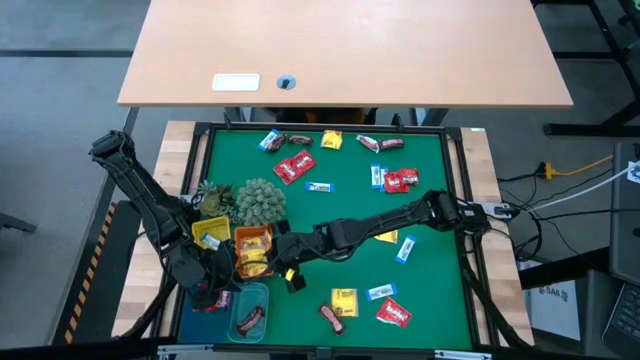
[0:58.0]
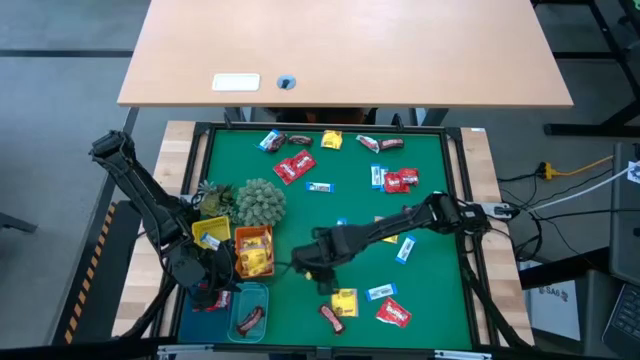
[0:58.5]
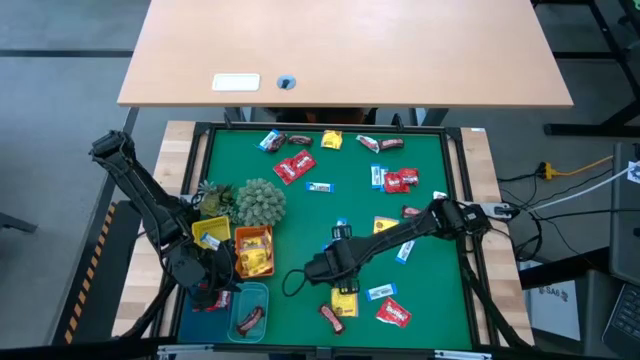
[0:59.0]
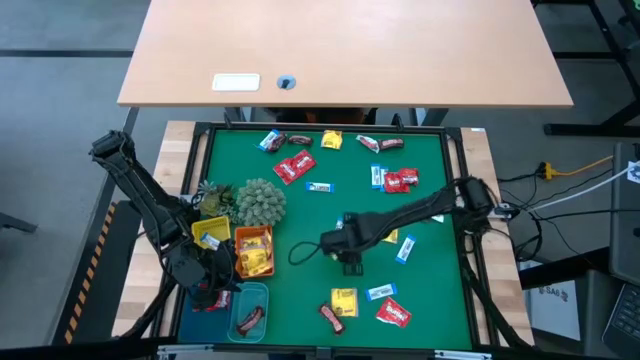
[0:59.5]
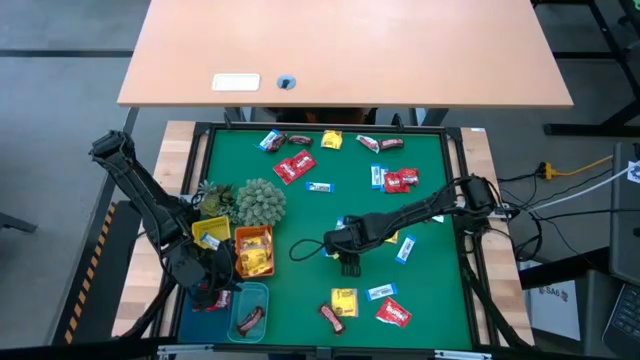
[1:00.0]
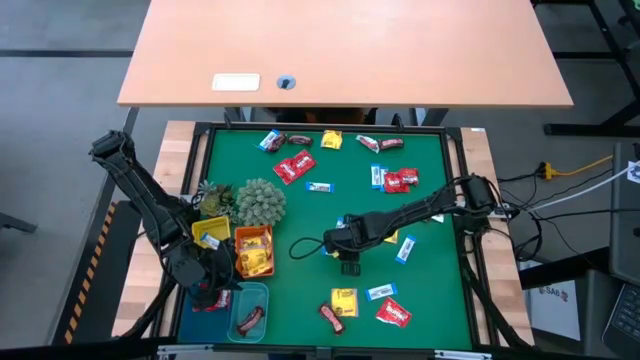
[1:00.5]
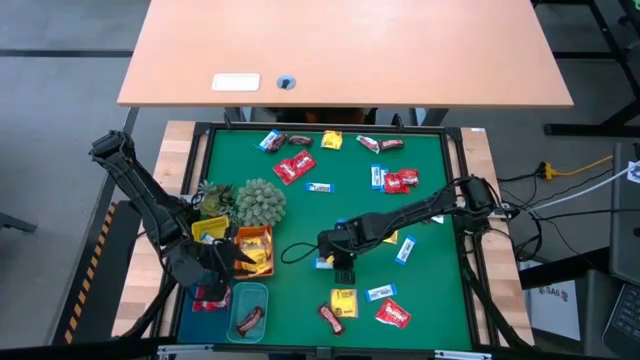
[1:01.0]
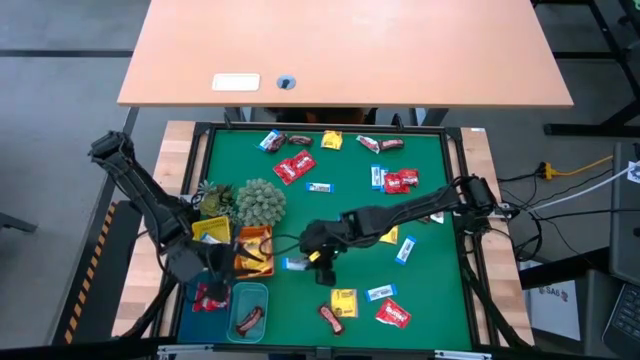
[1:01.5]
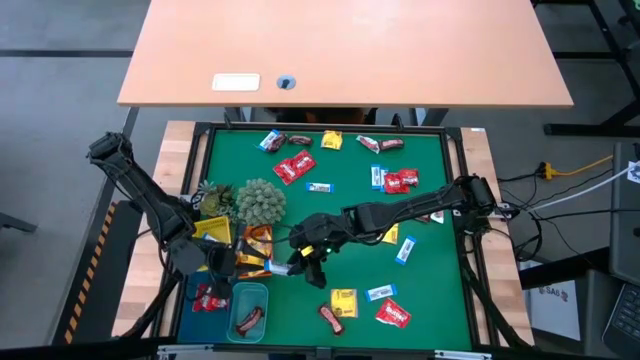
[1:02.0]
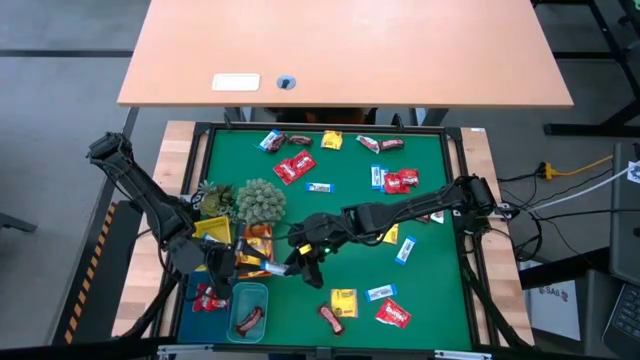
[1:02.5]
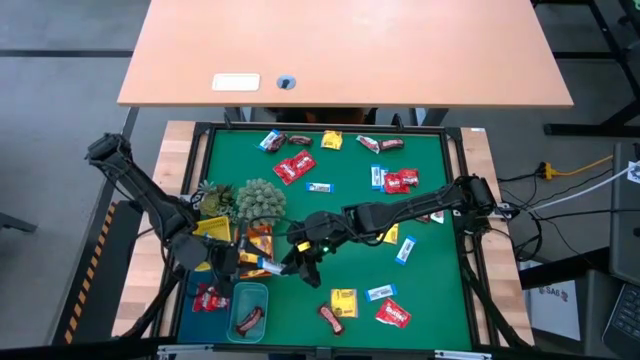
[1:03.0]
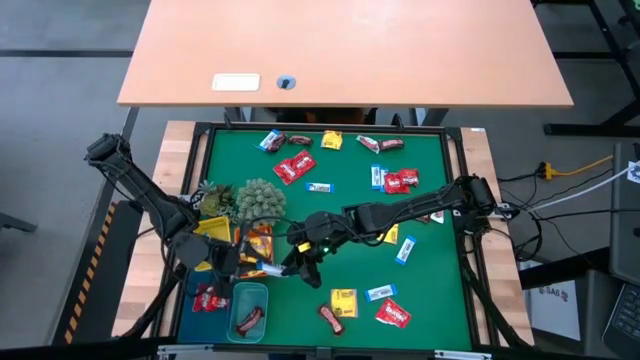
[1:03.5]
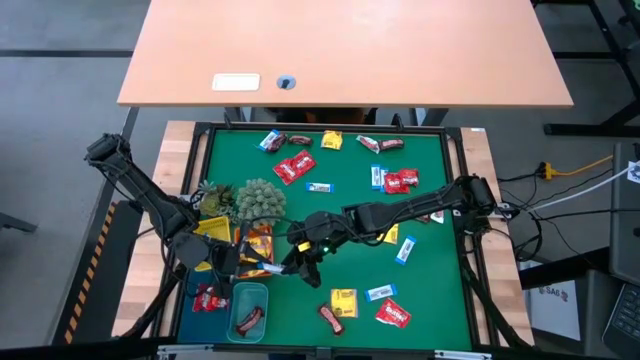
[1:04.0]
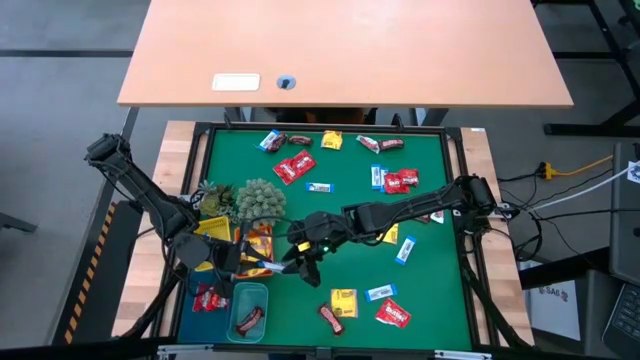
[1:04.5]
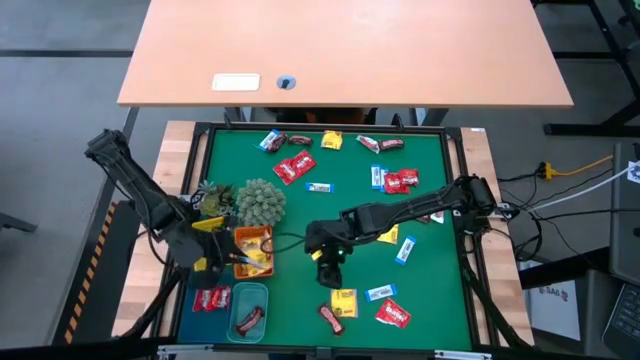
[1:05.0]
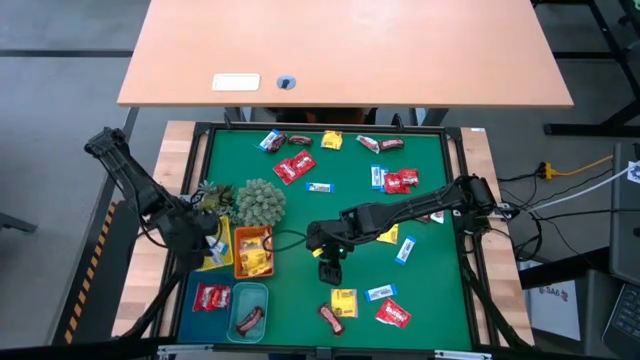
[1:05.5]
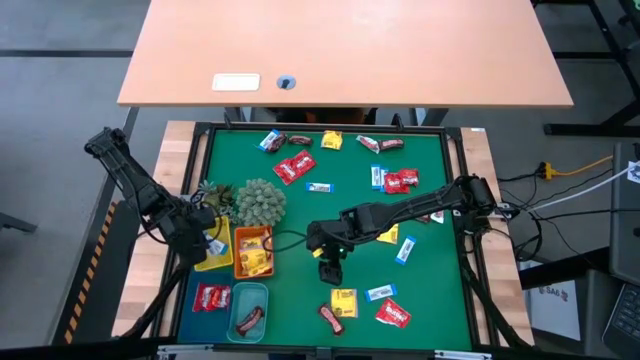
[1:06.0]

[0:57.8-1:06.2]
Task: Sort candy
Put the white chocolate into the yellow basket

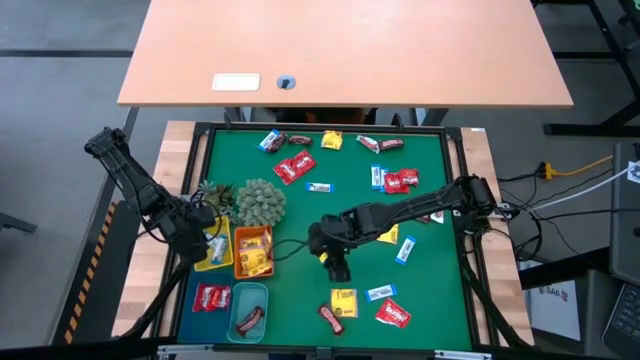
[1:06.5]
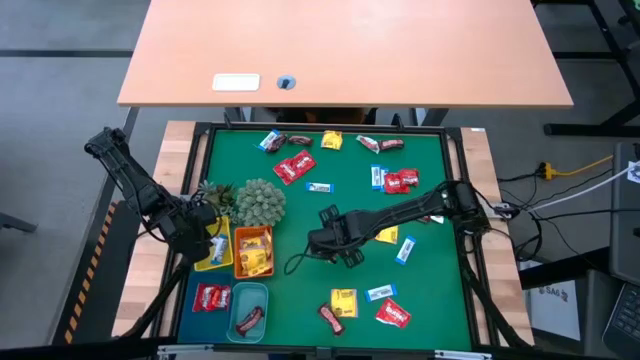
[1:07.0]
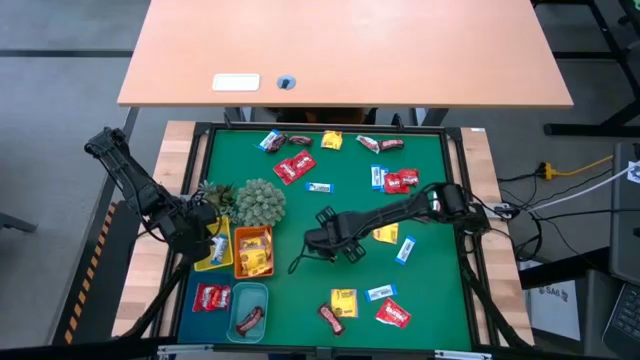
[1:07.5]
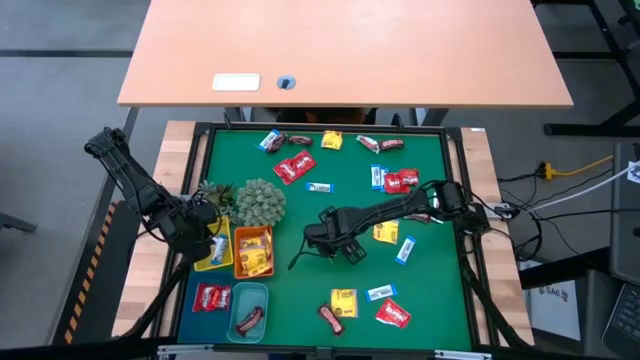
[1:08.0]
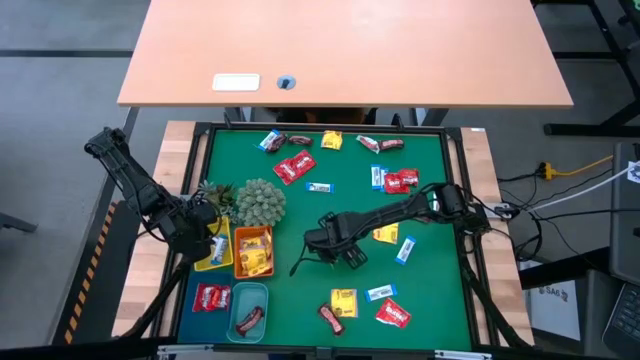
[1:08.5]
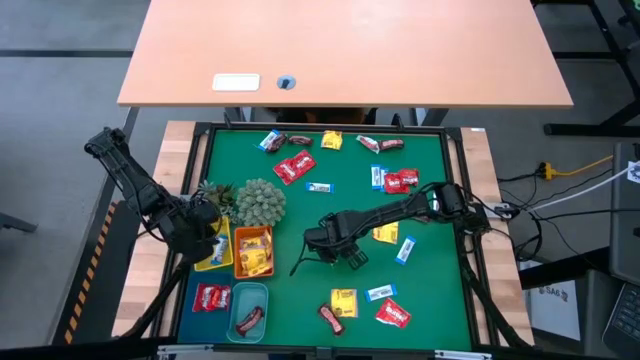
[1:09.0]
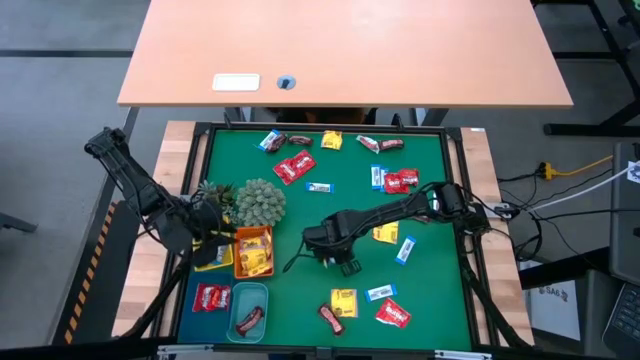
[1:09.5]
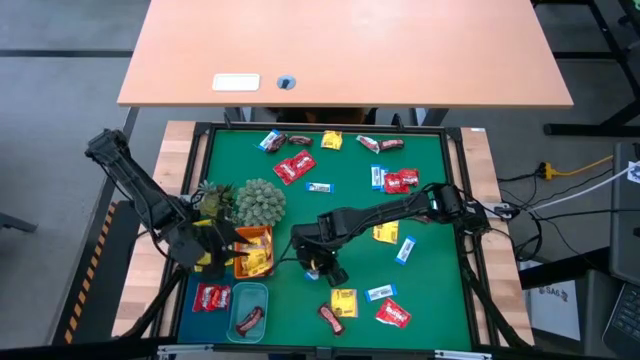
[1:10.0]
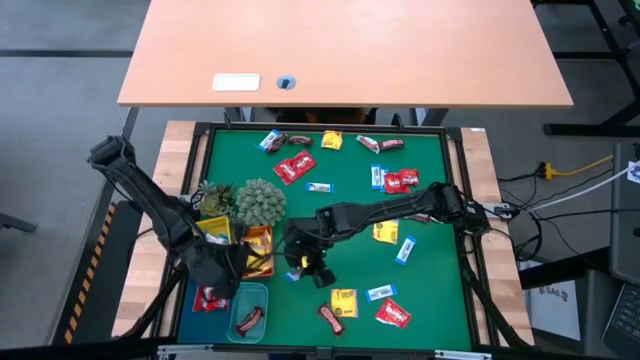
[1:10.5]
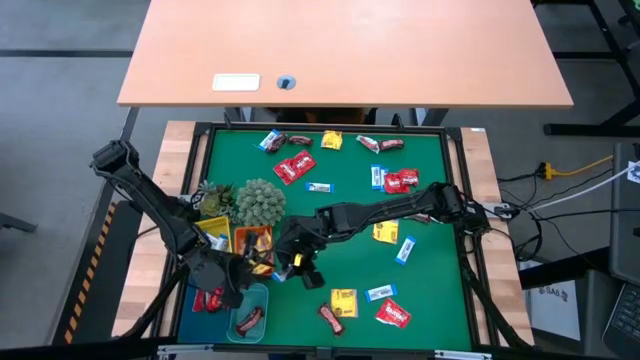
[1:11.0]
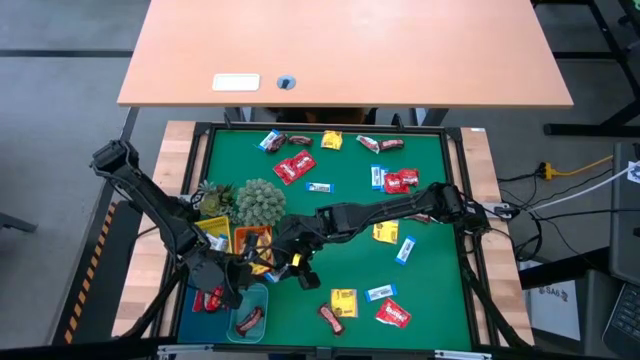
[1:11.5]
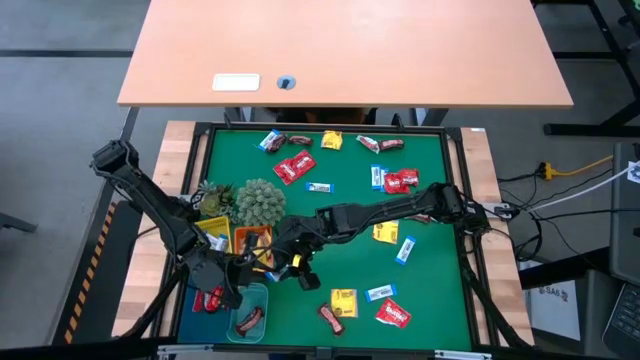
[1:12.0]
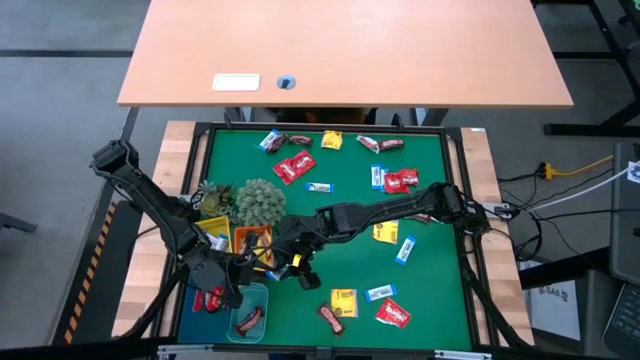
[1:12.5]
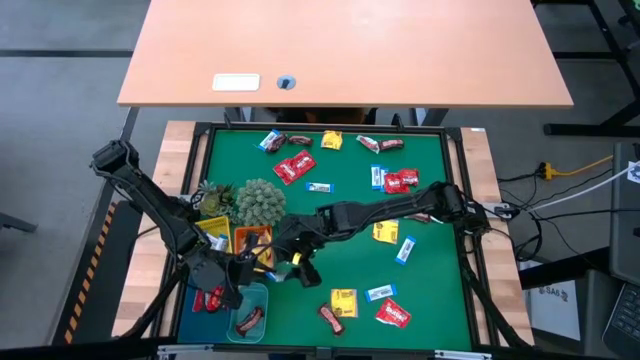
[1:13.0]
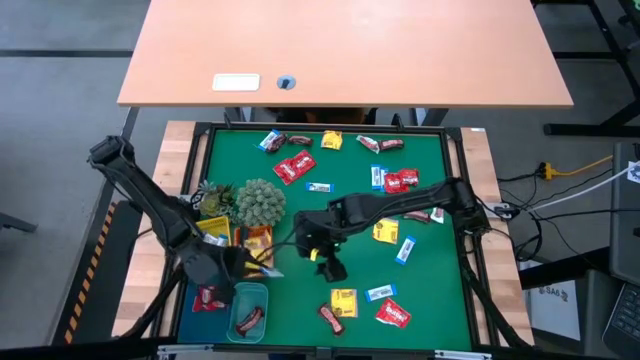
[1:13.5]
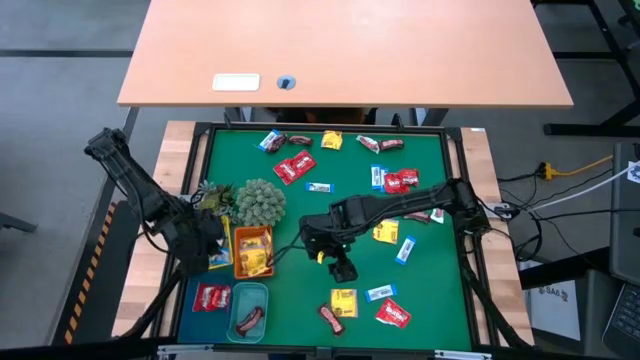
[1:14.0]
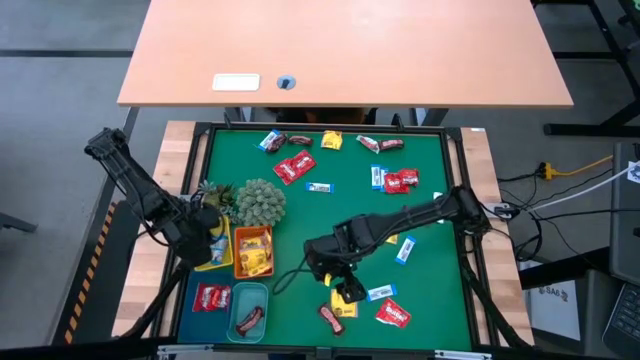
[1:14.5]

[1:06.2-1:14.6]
Put the white chocolate into the yellow basket

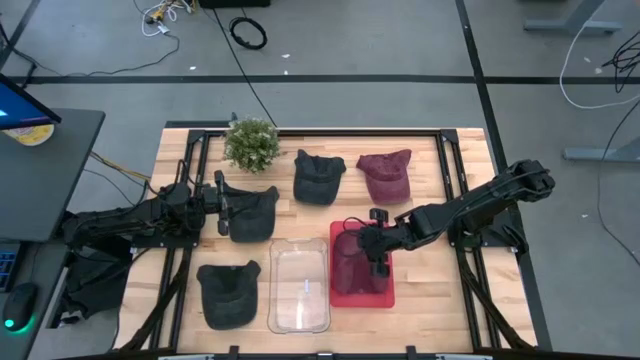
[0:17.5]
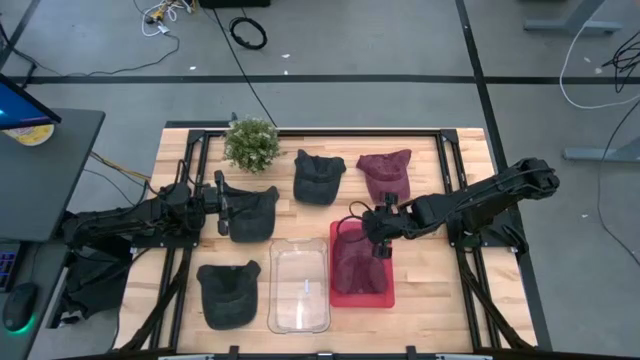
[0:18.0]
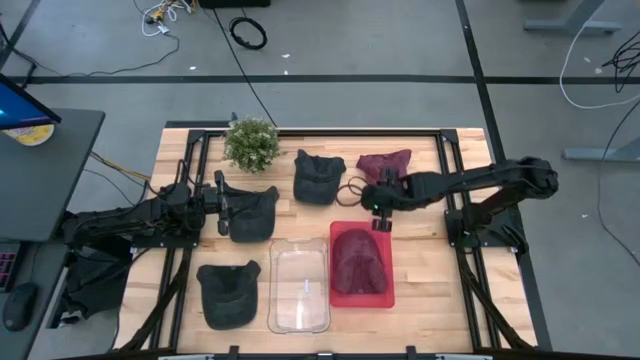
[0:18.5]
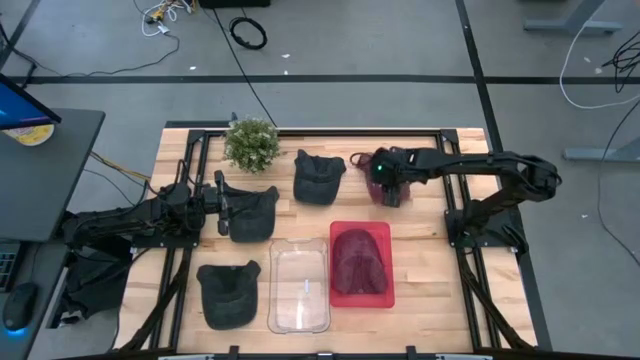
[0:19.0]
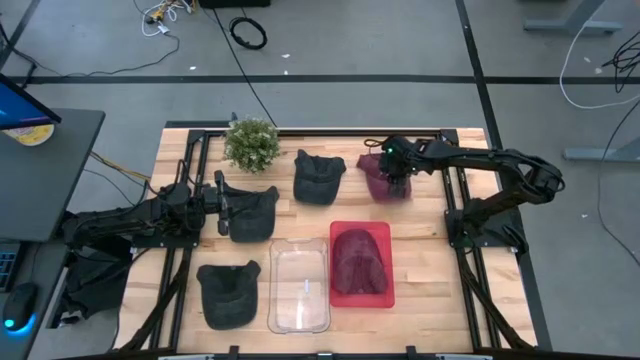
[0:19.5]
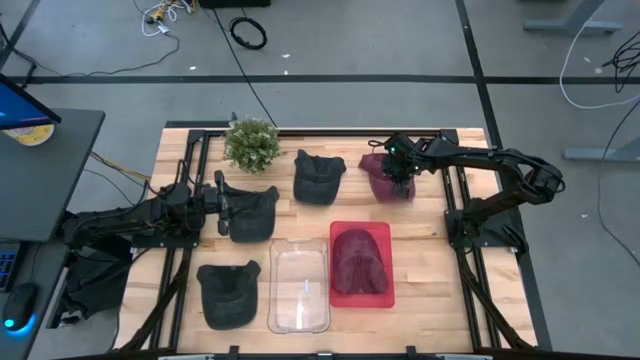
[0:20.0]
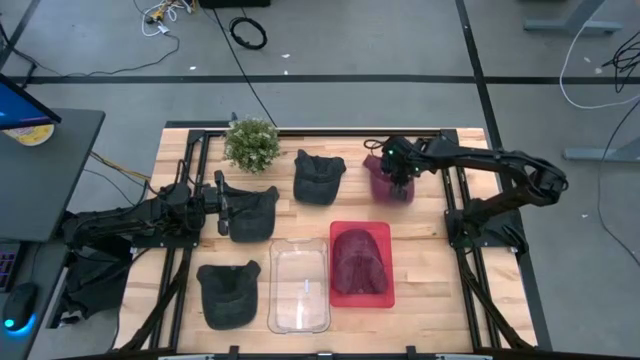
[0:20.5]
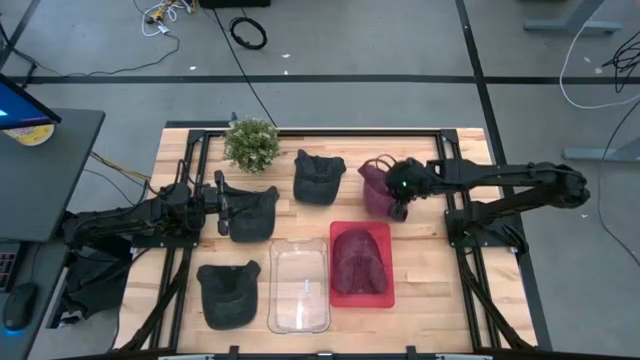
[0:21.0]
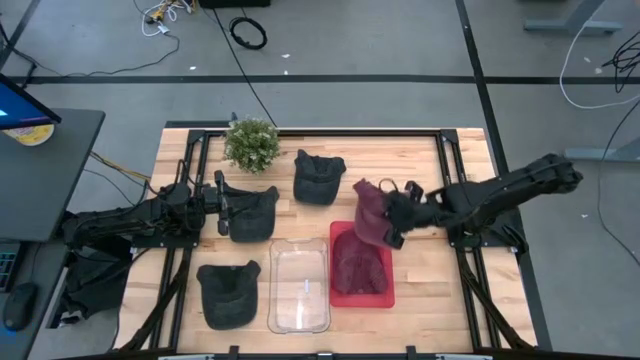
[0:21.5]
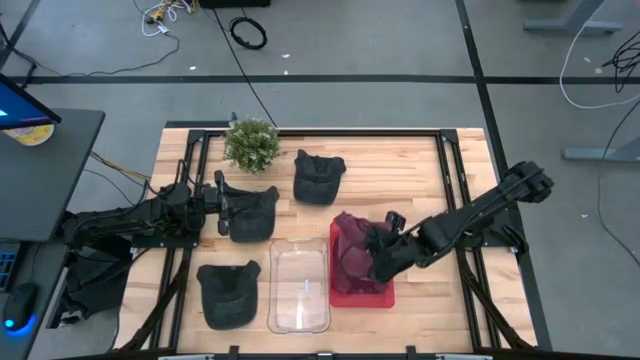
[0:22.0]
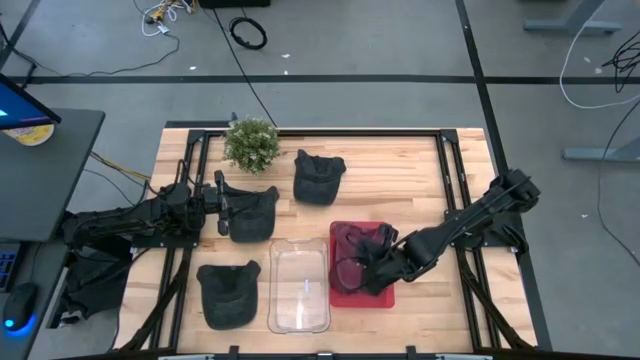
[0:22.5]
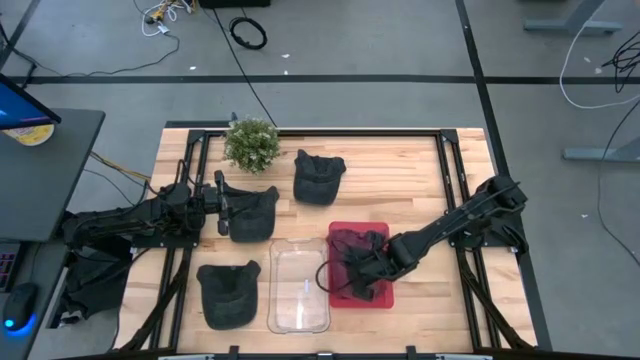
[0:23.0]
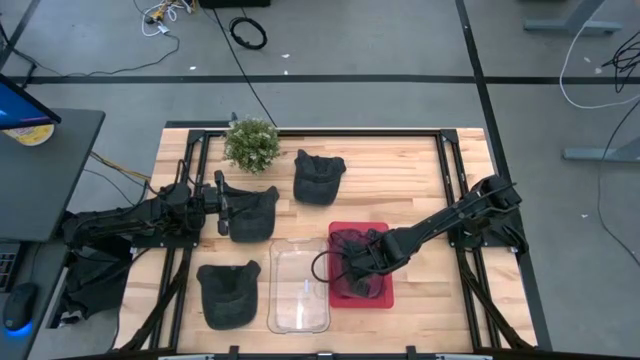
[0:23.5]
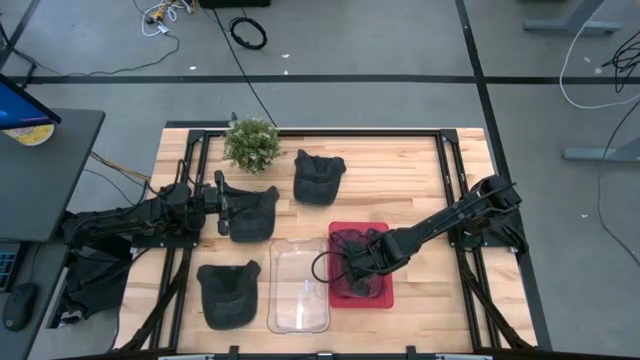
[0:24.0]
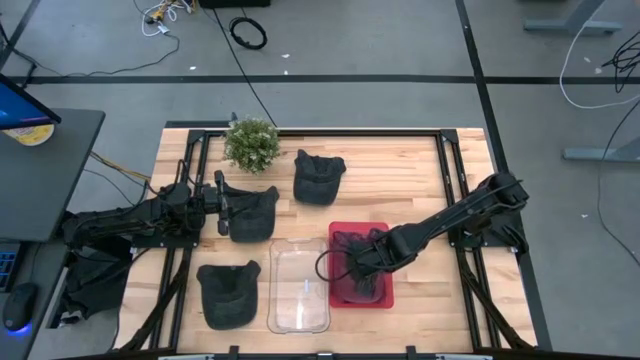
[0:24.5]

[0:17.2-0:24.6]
Task: Pick & Place hat
Put the red cap into the red bin
